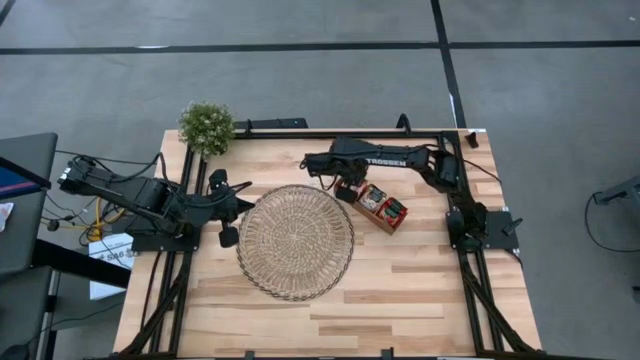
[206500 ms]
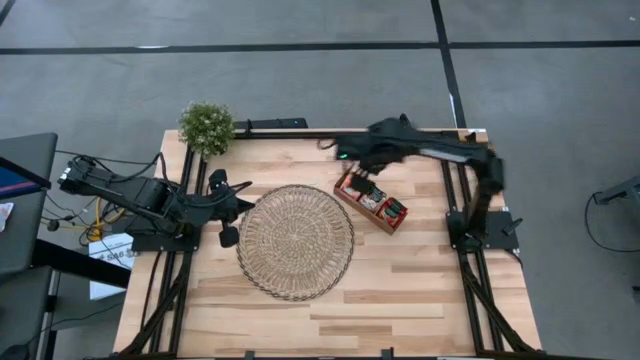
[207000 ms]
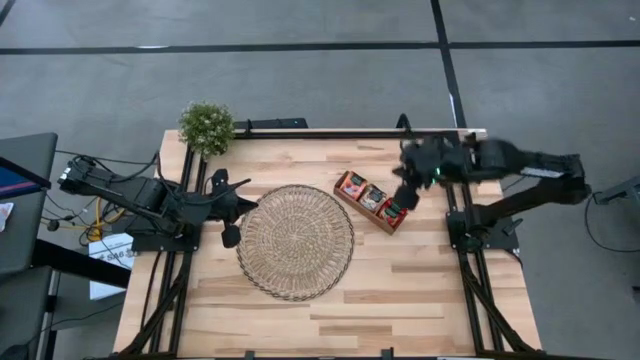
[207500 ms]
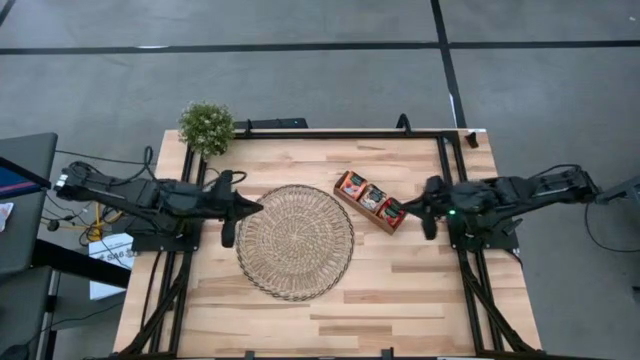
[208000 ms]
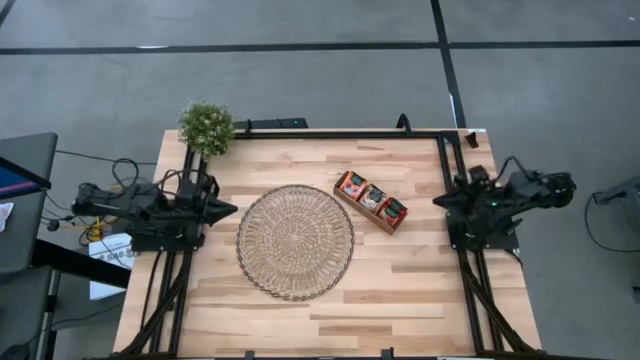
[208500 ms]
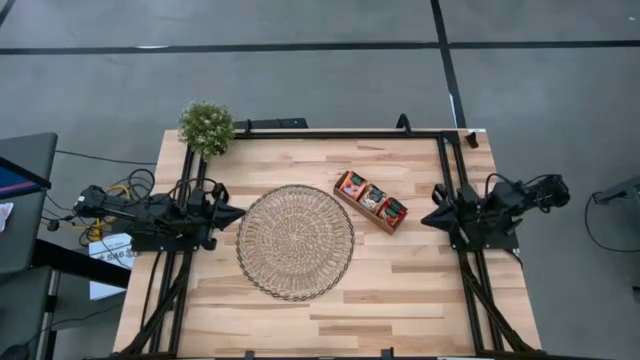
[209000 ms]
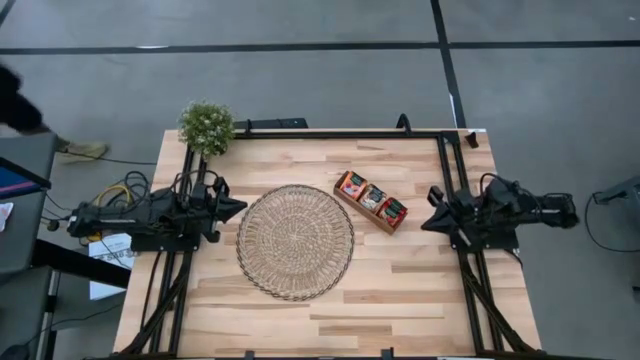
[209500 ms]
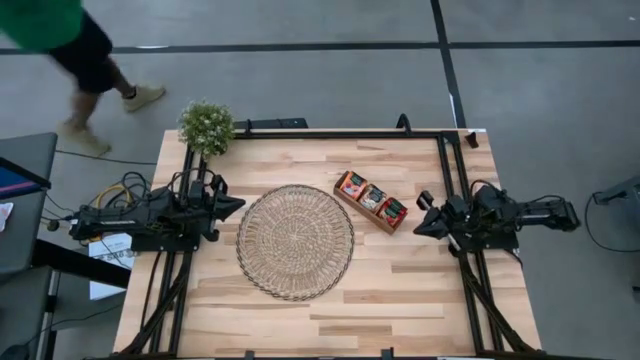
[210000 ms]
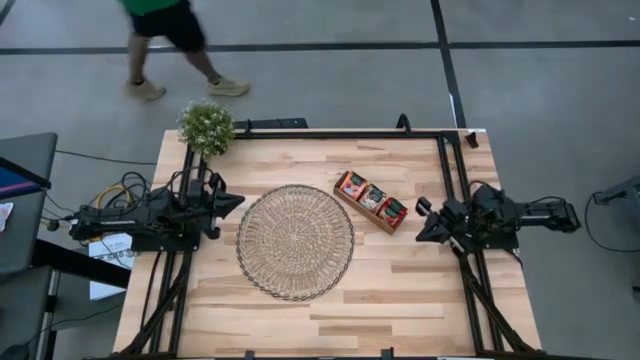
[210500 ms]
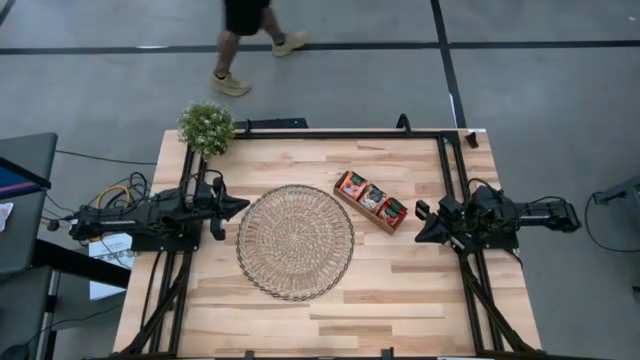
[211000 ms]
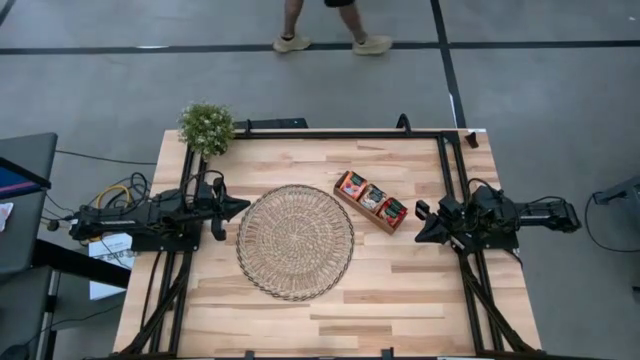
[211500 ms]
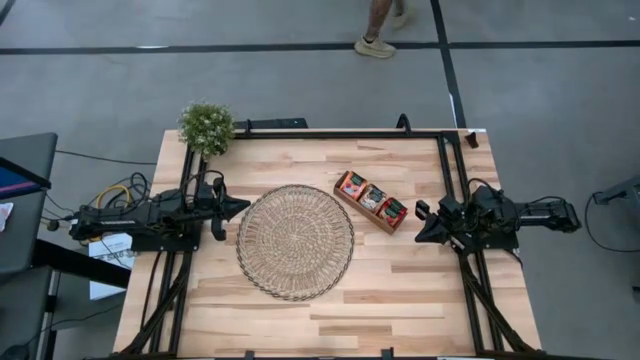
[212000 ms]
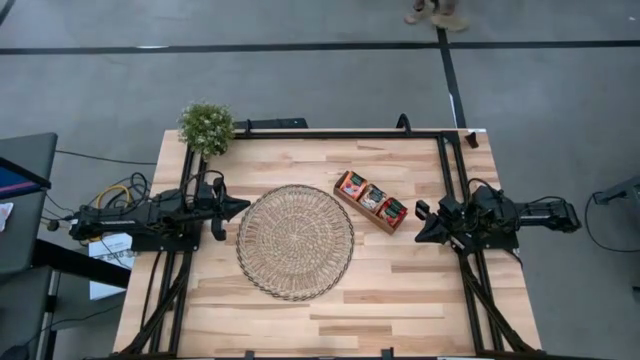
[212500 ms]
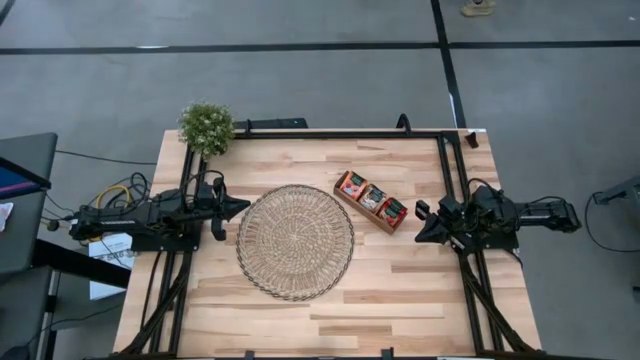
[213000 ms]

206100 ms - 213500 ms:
Task: Pick & Place Tea
Return to Home Position

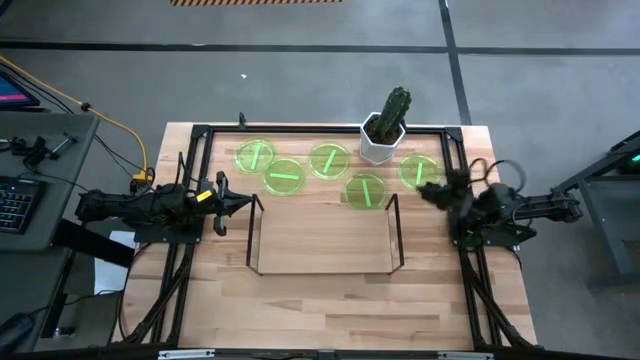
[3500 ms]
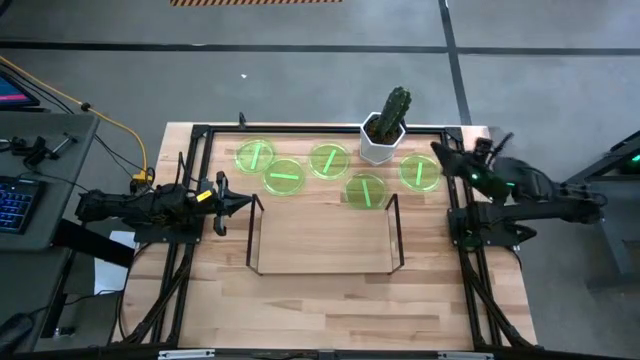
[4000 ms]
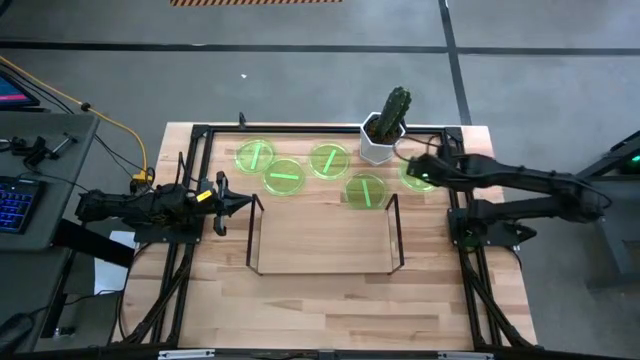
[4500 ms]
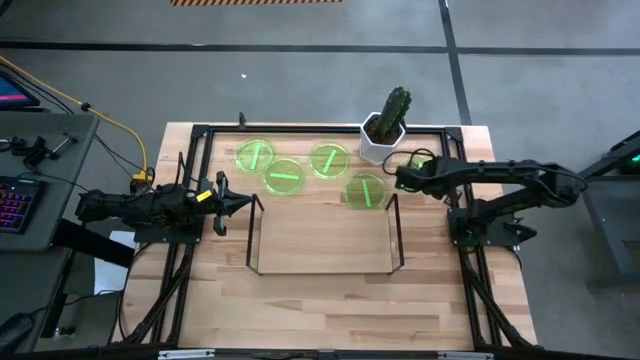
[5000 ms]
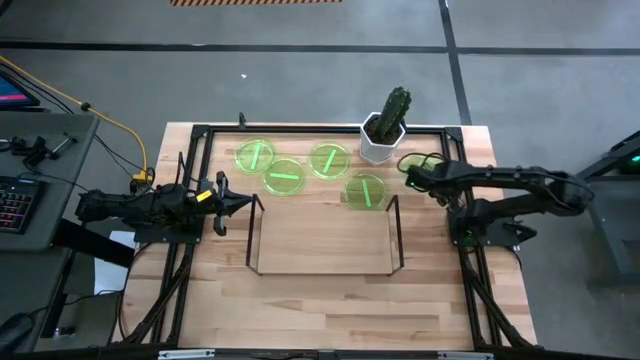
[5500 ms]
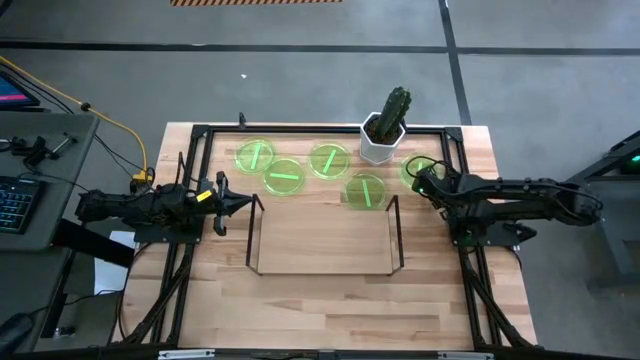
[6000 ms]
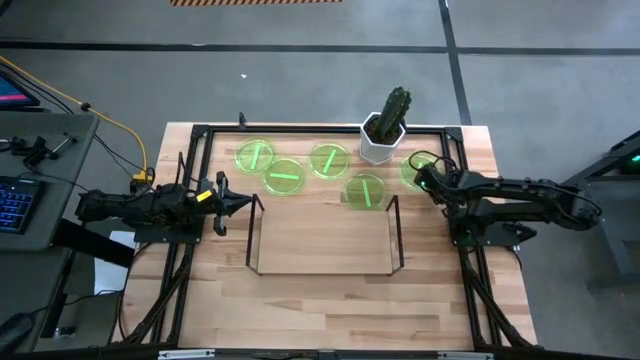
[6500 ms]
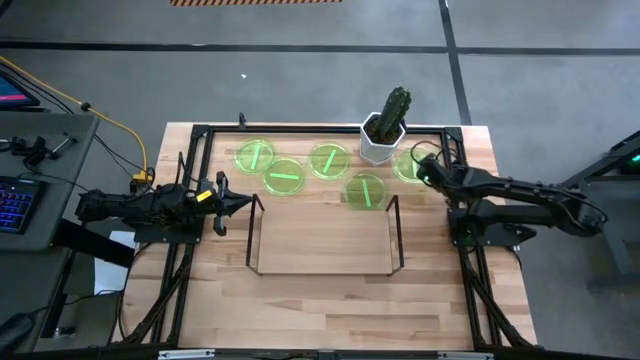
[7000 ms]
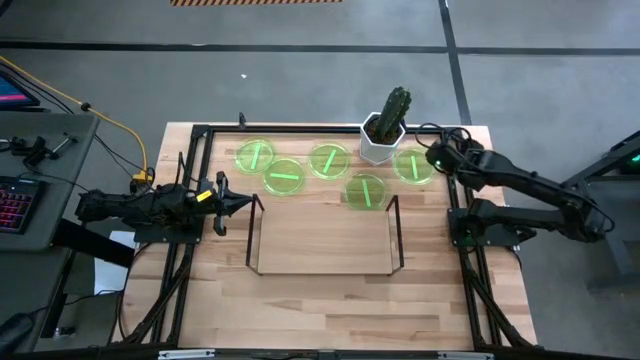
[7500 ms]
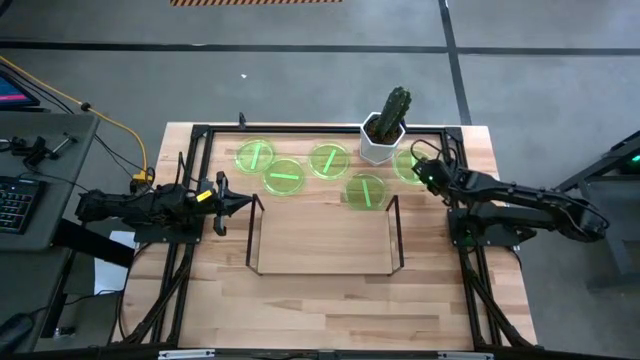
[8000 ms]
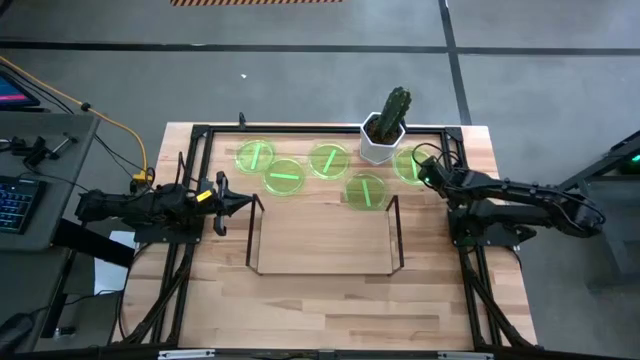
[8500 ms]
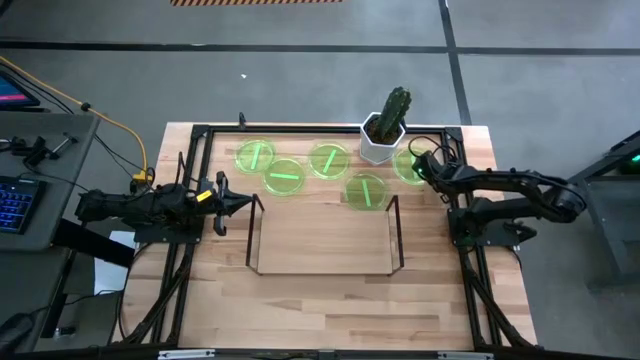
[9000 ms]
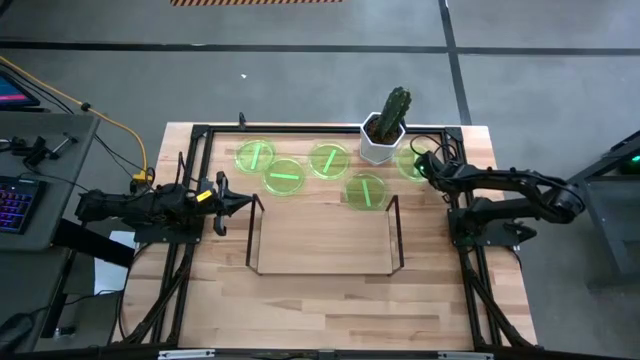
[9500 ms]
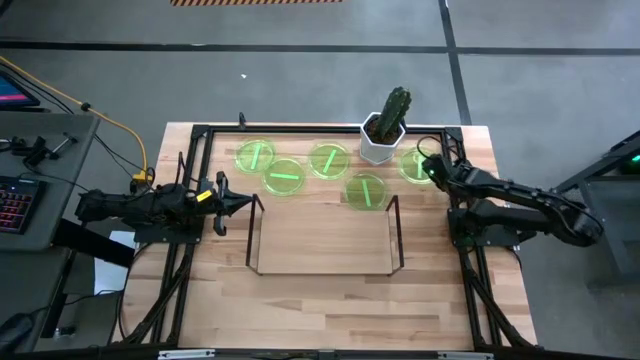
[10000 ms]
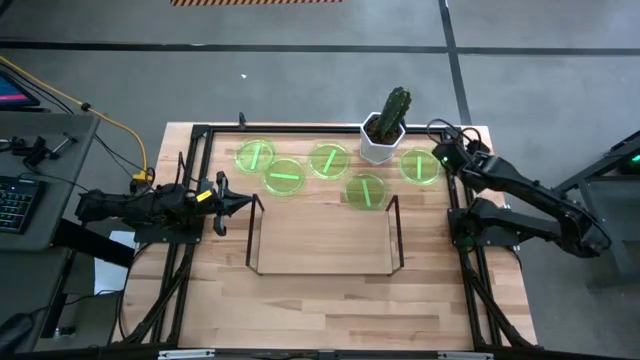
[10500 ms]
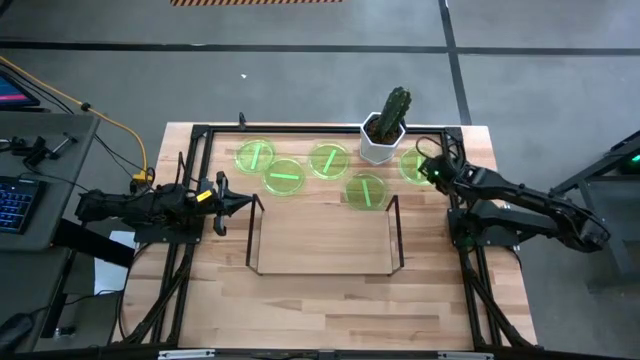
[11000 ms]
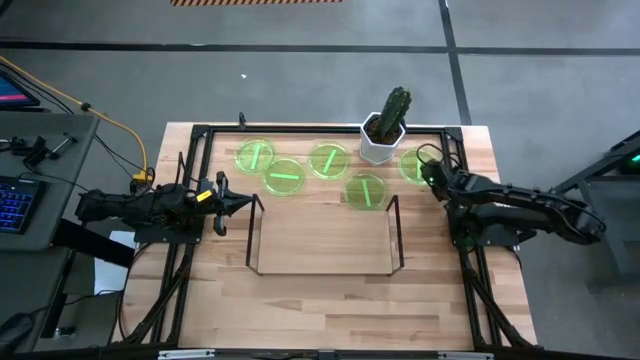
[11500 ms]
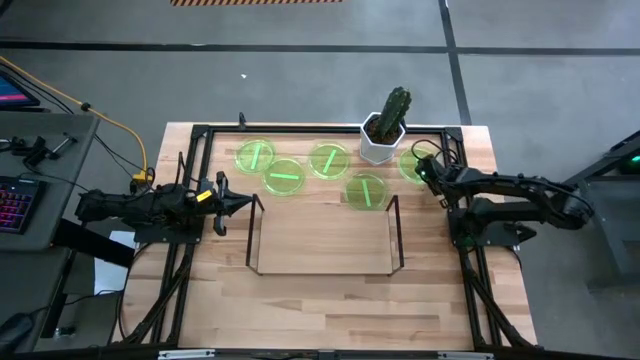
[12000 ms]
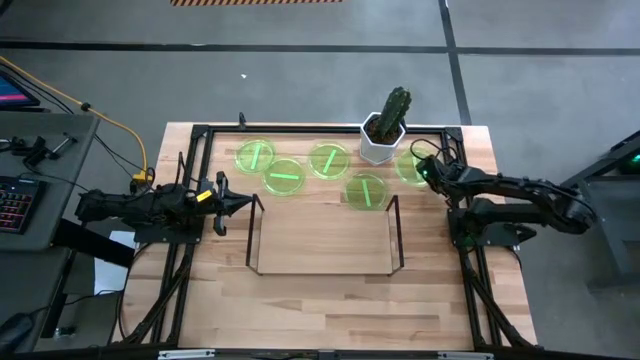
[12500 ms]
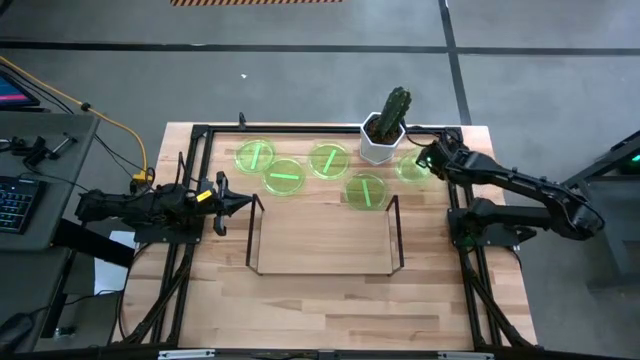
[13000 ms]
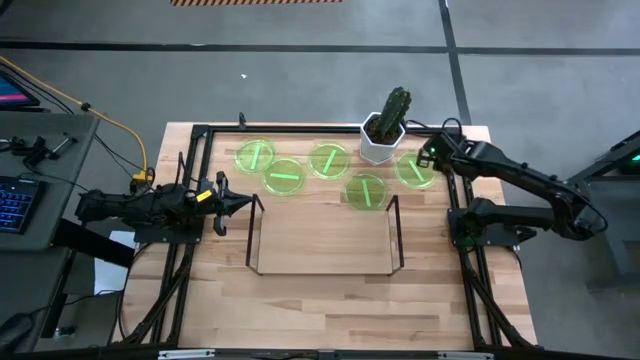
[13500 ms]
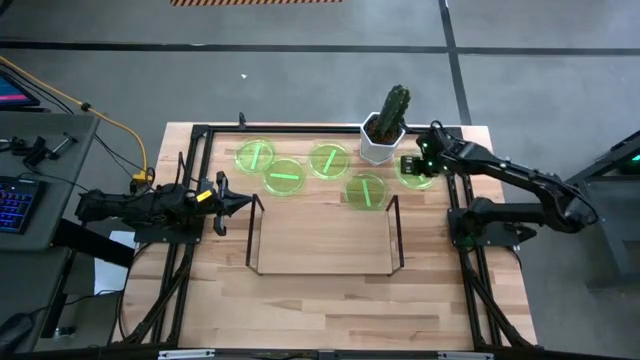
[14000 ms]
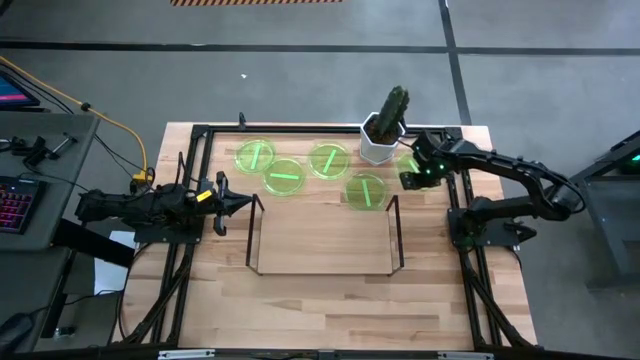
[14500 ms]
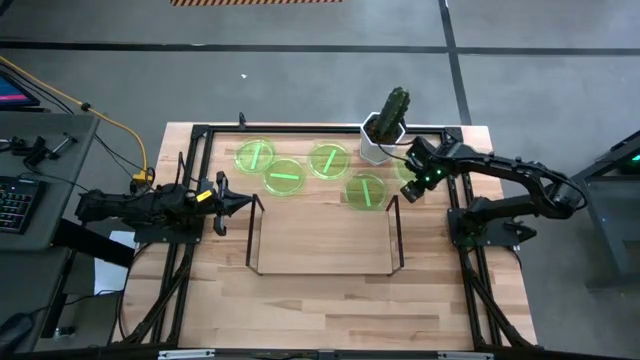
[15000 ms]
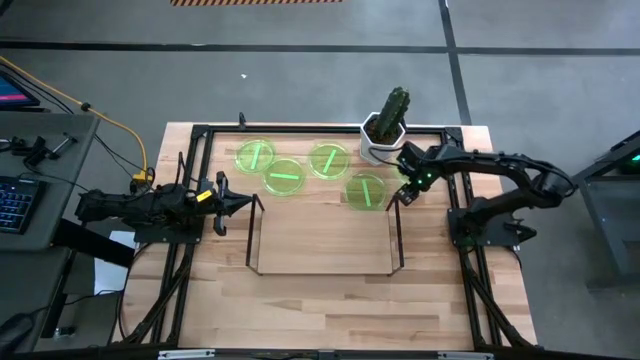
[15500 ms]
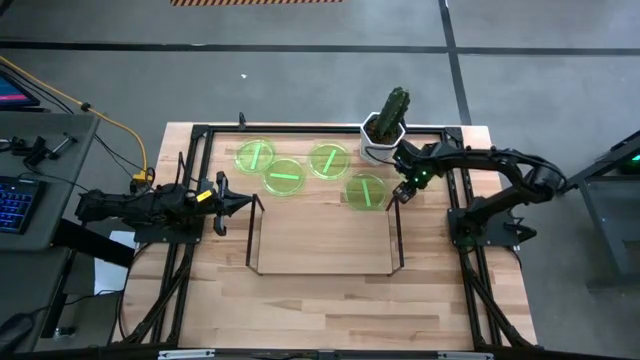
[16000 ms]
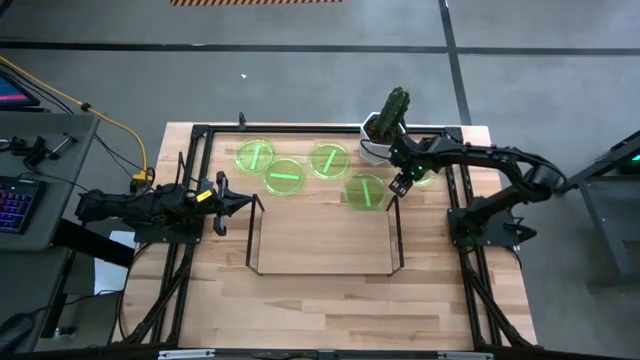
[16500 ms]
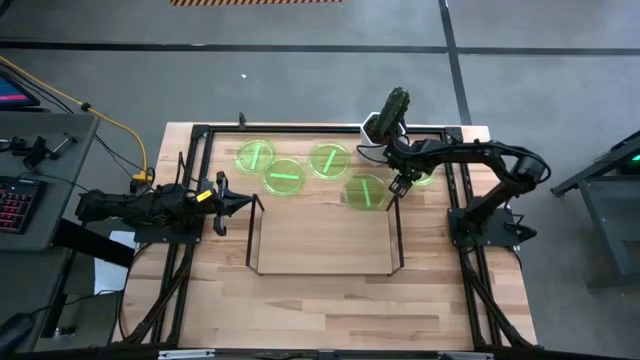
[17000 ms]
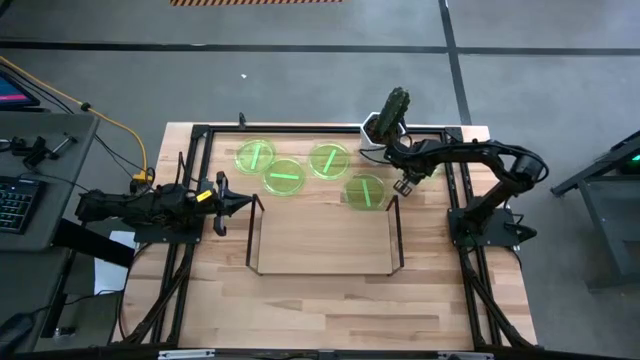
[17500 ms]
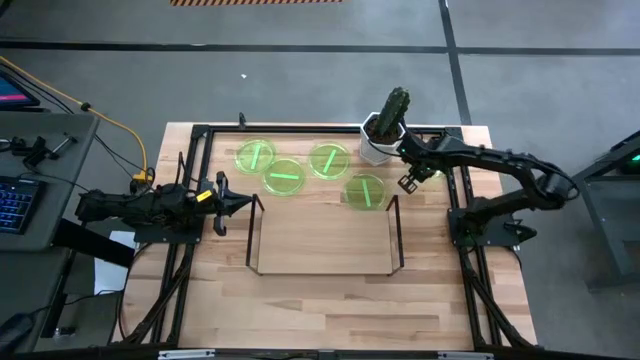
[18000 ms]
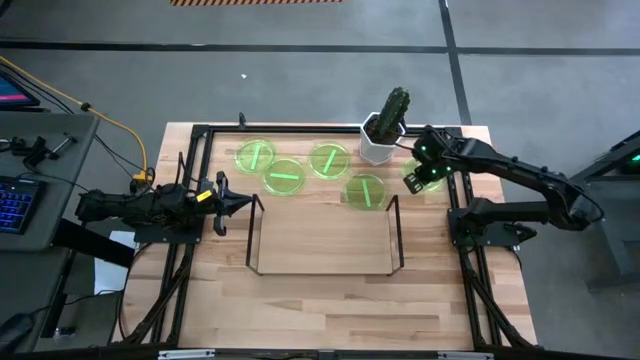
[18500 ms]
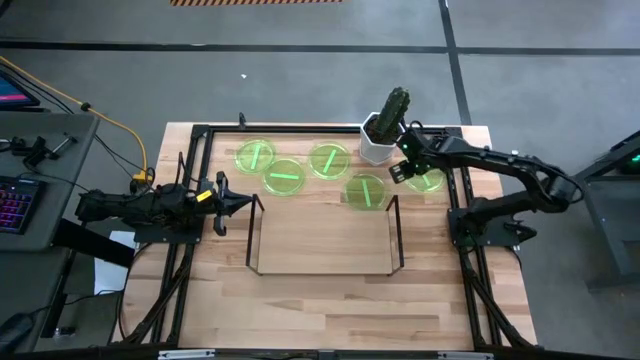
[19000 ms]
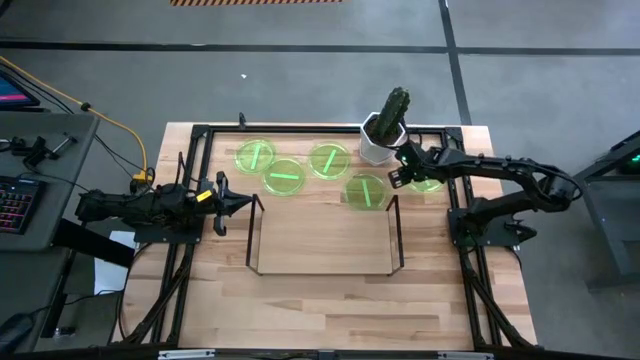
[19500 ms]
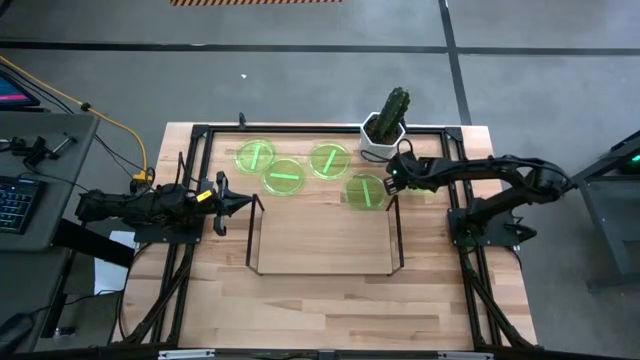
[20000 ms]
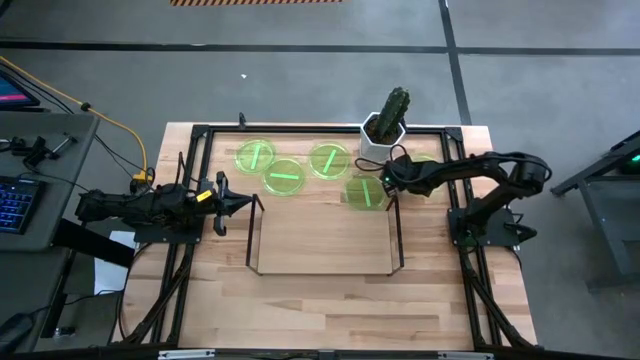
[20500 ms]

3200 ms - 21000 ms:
Task: Place and stack plates onto a shelf
Put the green transparent plate on the shelf
